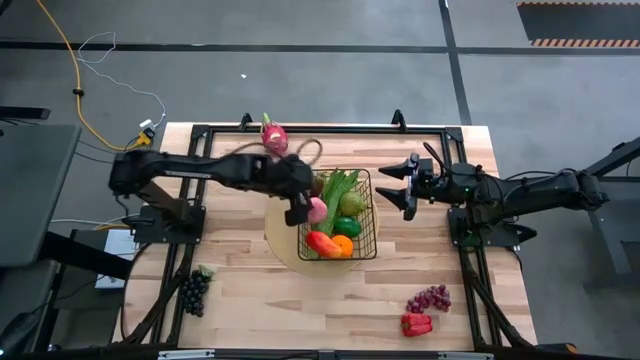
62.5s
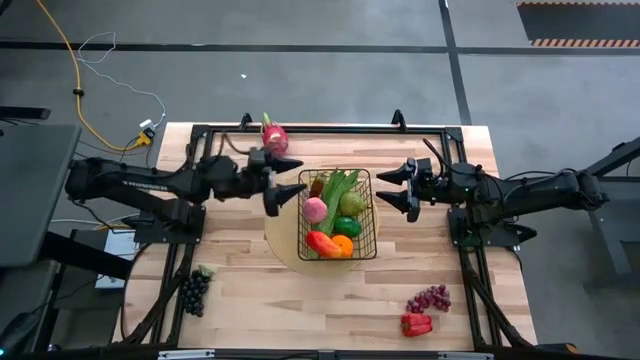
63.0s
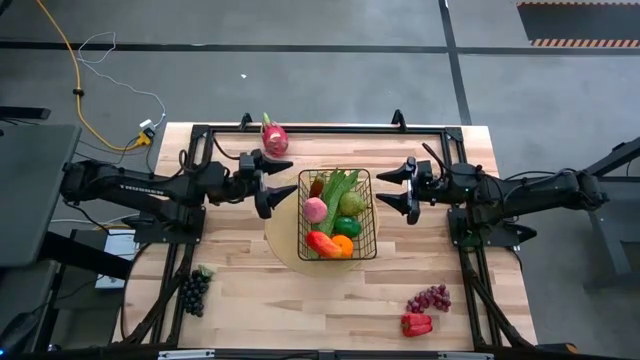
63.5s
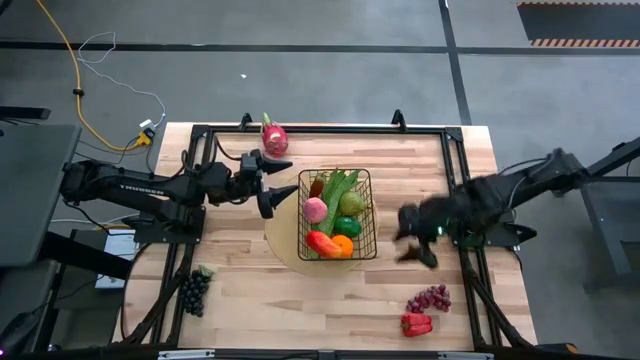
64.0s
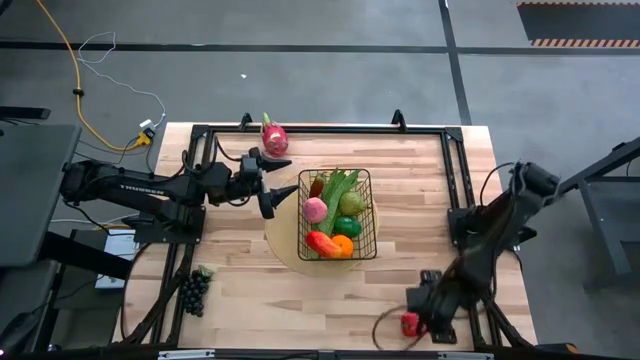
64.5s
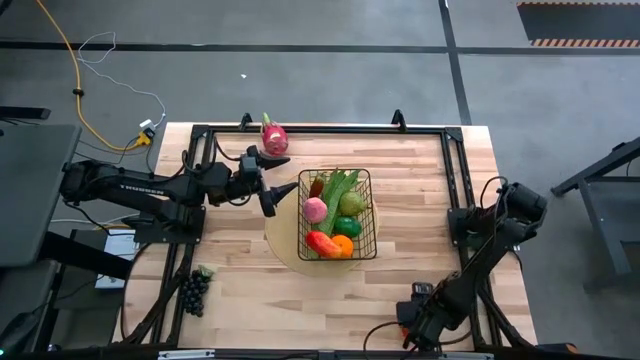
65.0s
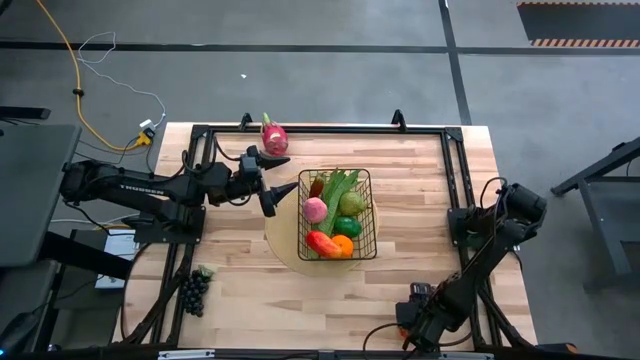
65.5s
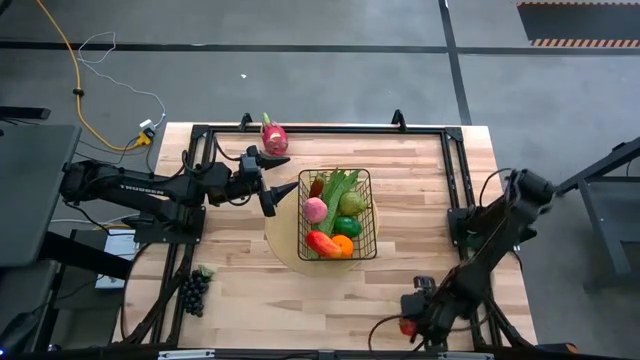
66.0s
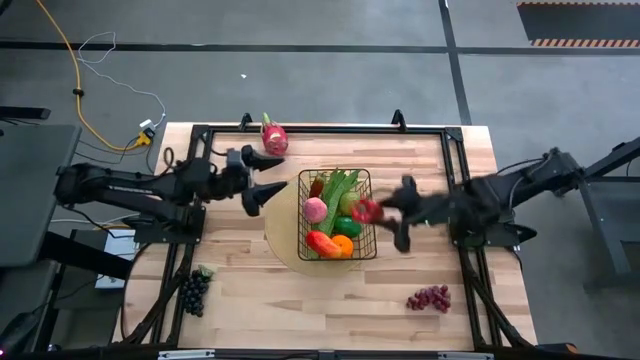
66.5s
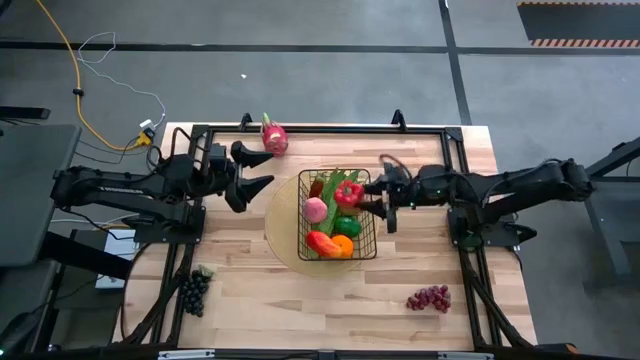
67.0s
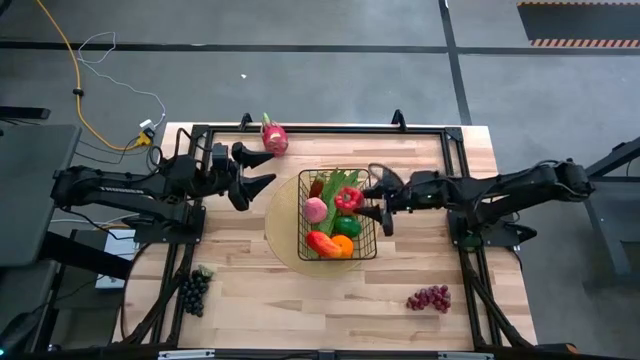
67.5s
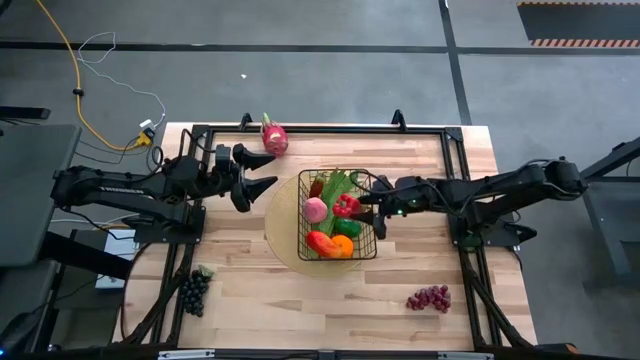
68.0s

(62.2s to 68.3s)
Task: Build produce basket
Put the red bell pepper into the wire basket

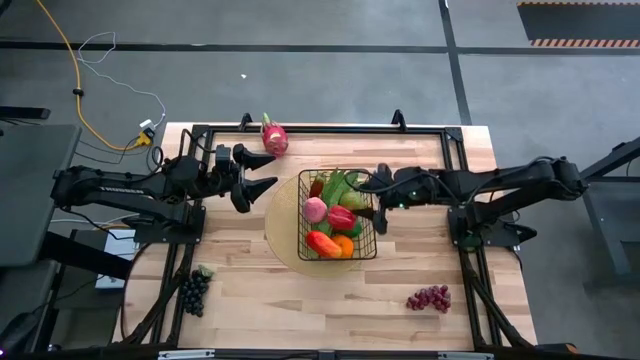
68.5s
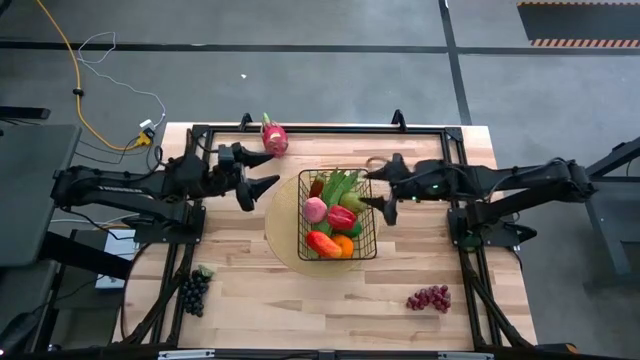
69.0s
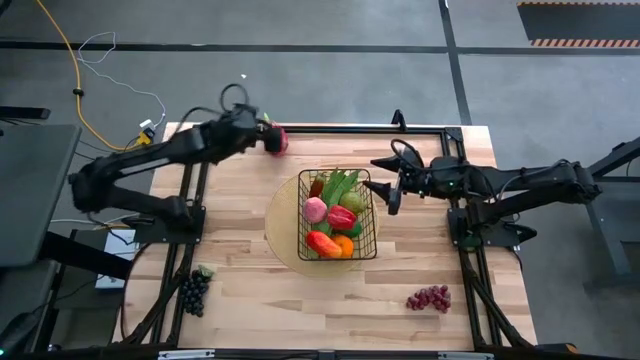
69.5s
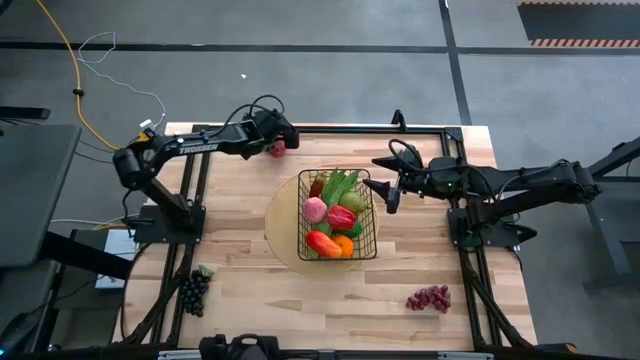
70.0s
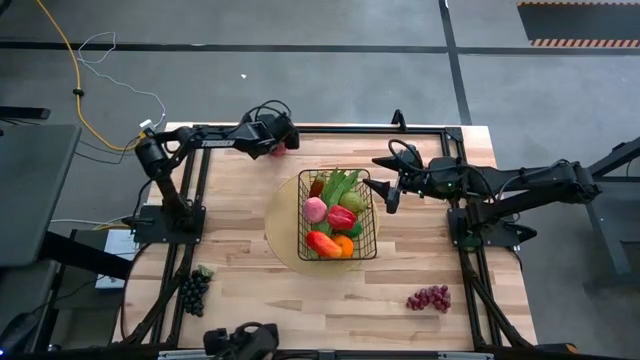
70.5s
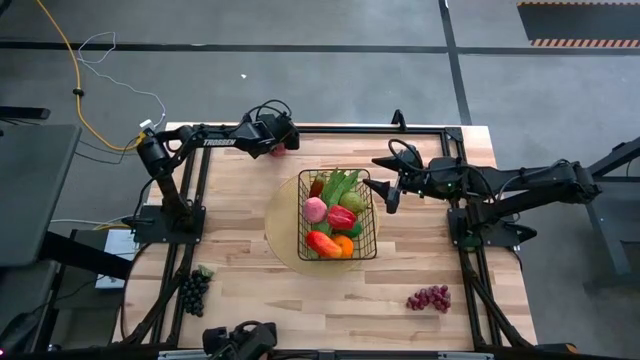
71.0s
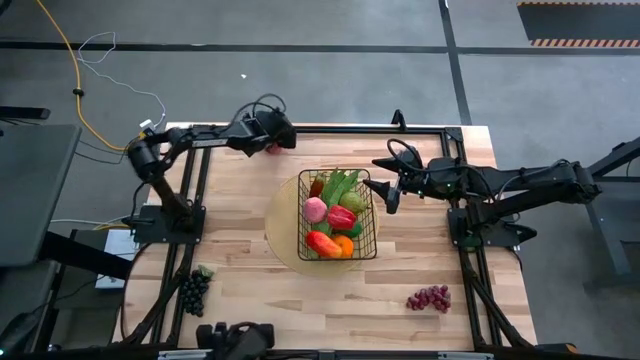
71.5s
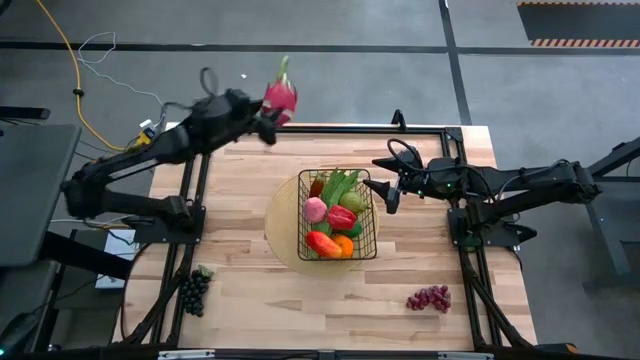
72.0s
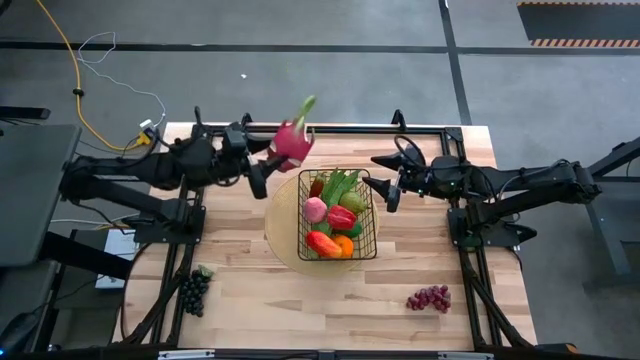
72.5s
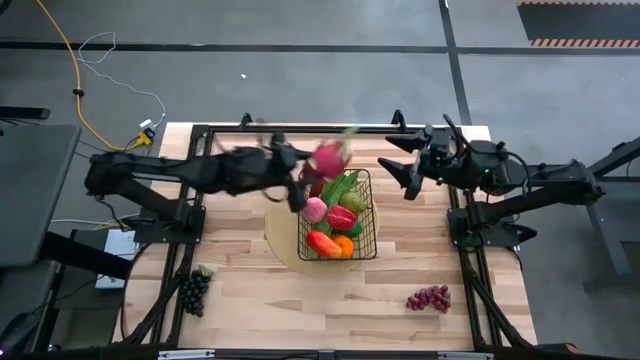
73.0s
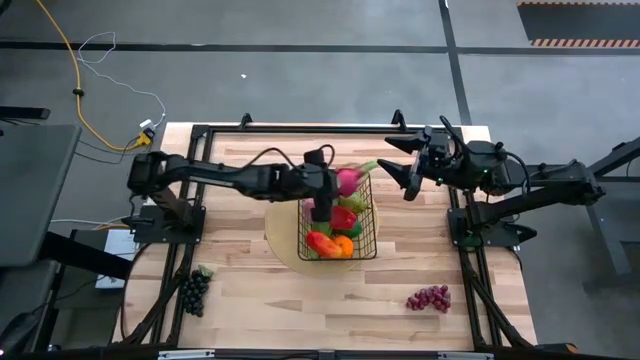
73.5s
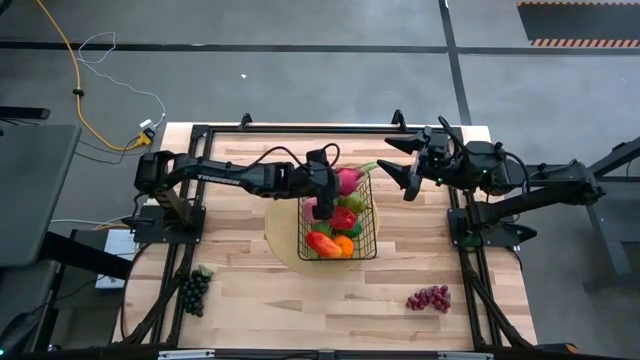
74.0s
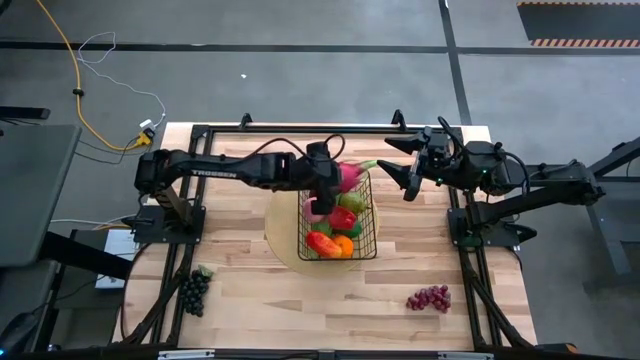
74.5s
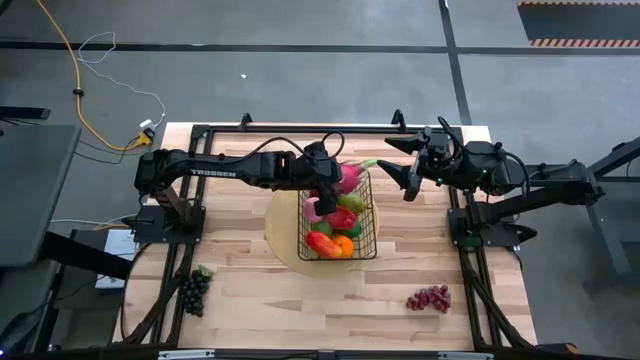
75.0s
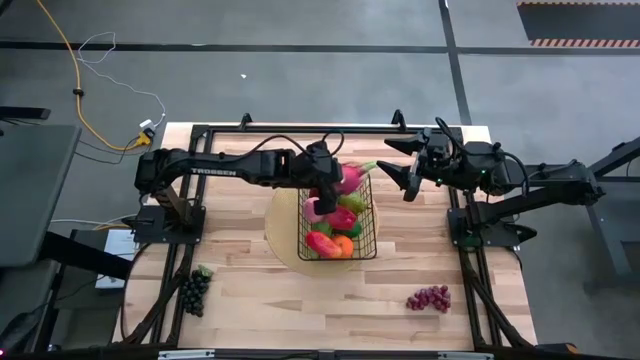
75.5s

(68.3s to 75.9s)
Put the dragonfruit into the wire basket

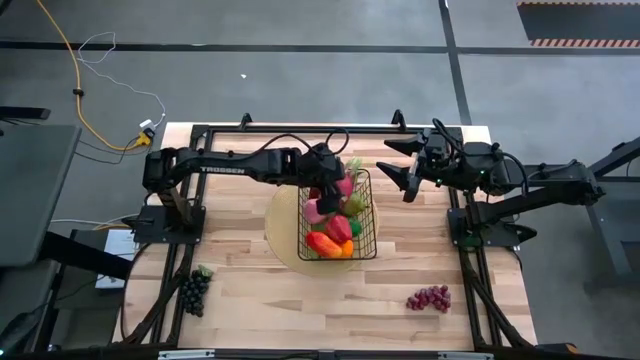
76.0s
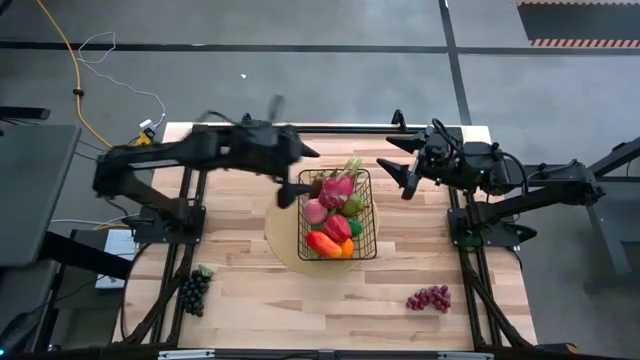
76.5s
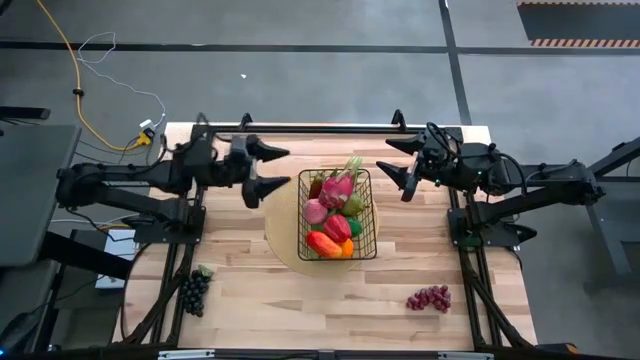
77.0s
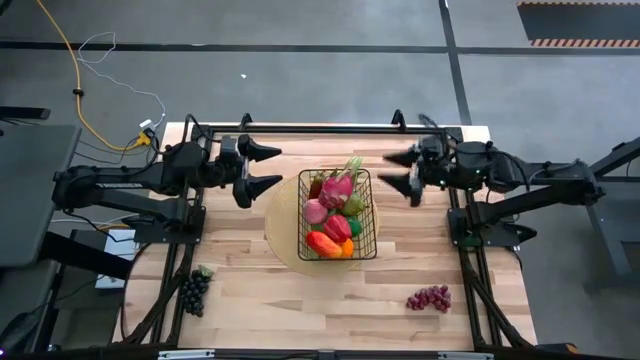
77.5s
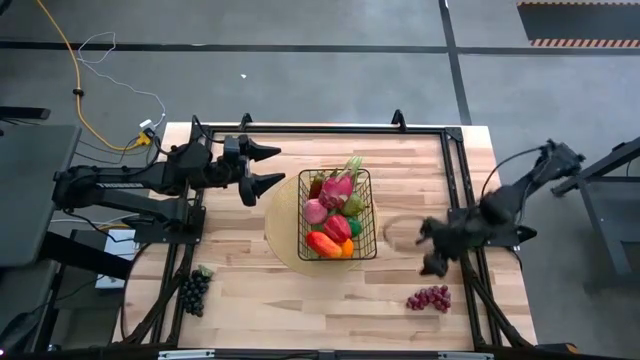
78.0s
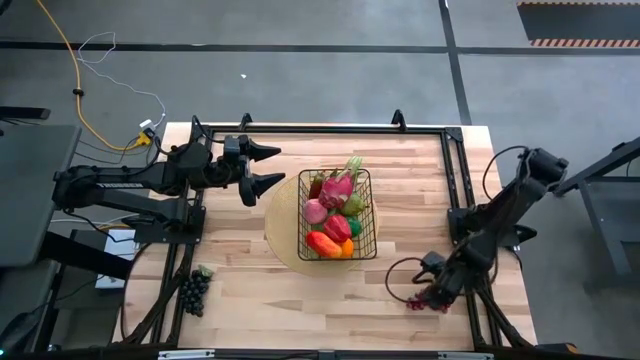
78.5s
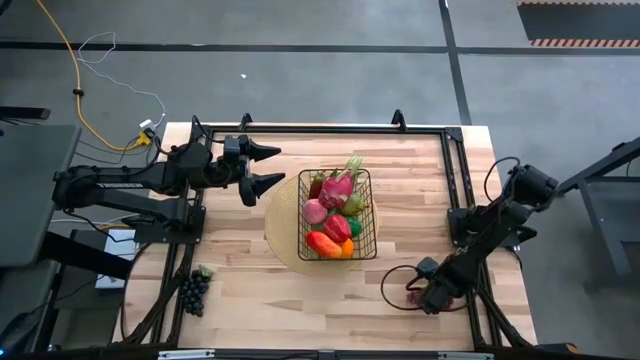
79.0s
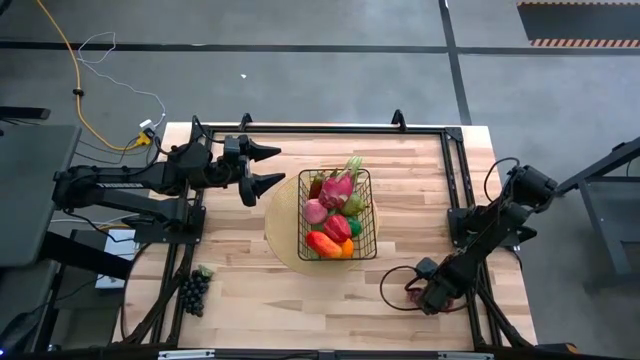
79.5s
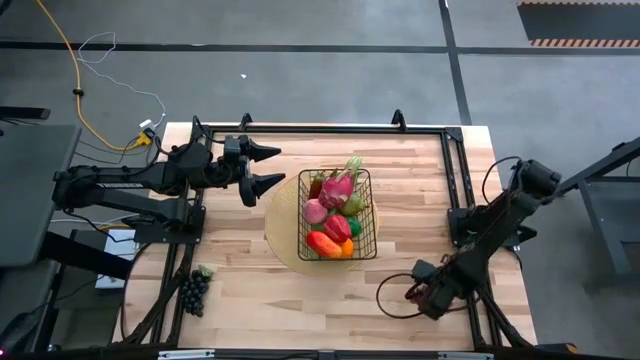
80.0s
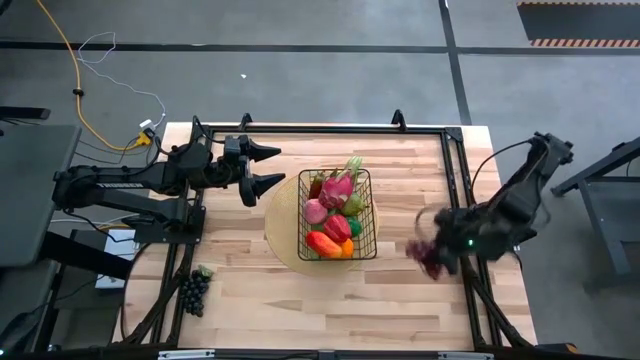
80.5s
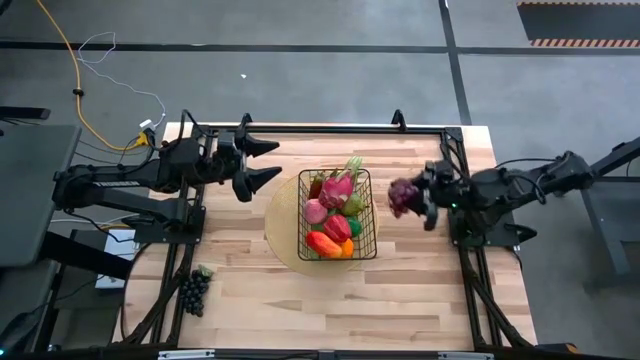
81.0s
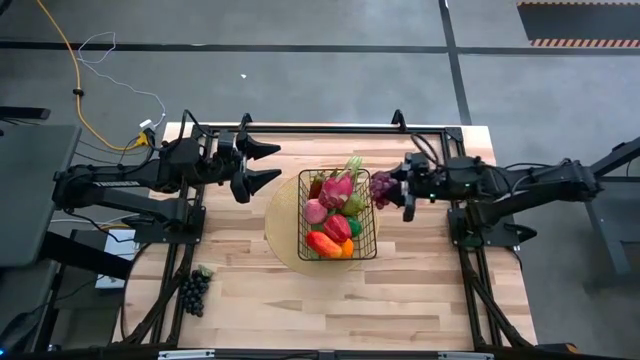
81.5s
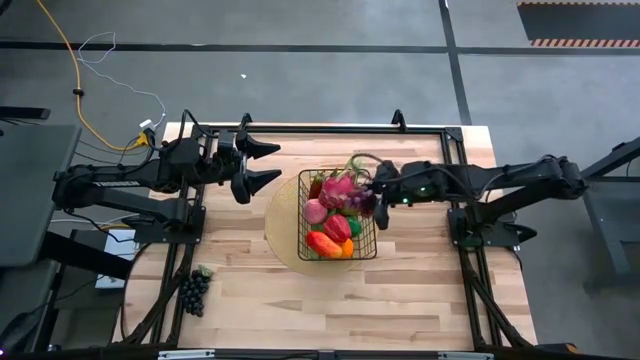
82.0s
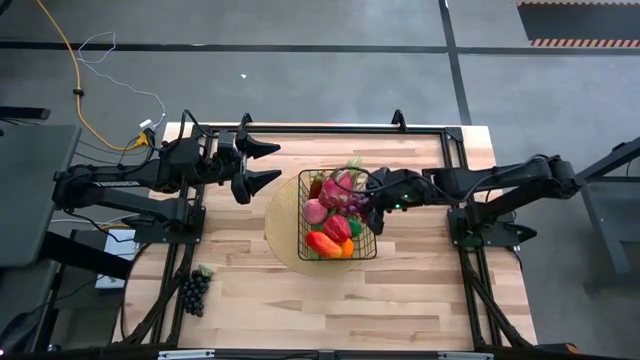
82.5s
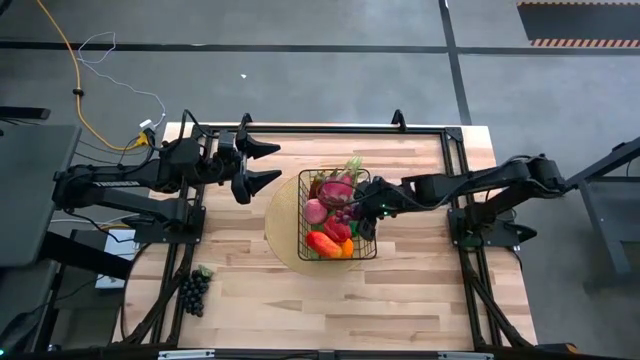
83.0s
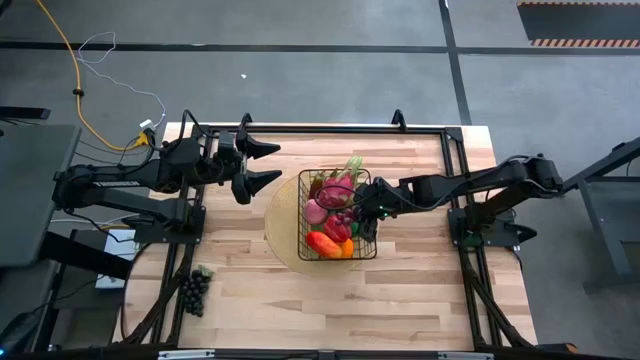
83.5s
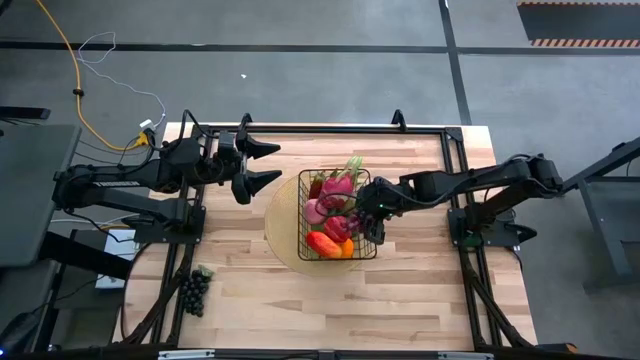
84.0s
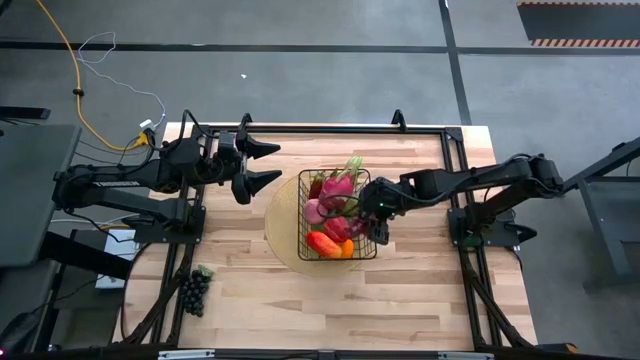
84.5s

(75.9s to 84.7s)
Put the grapes into the wire basket
